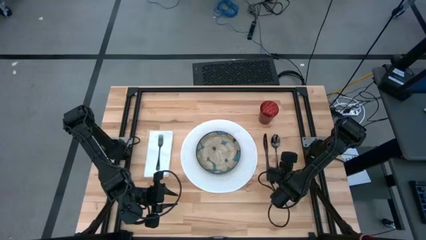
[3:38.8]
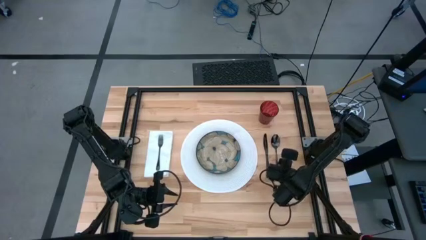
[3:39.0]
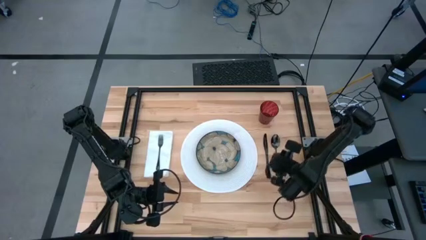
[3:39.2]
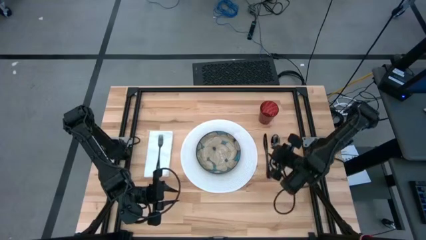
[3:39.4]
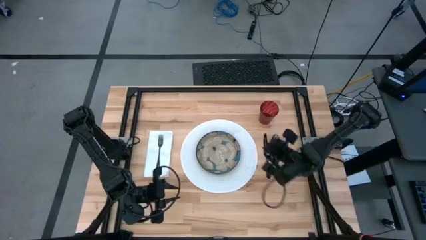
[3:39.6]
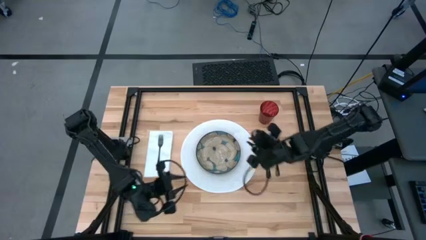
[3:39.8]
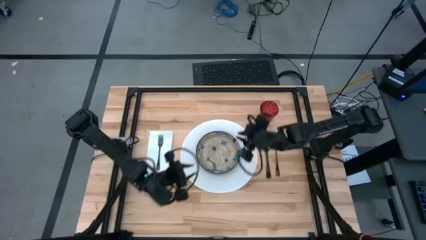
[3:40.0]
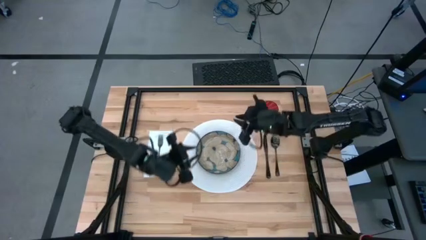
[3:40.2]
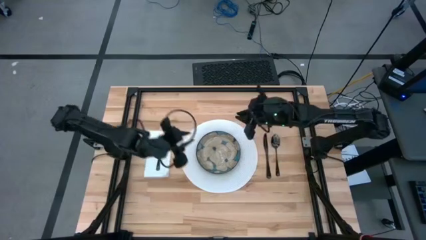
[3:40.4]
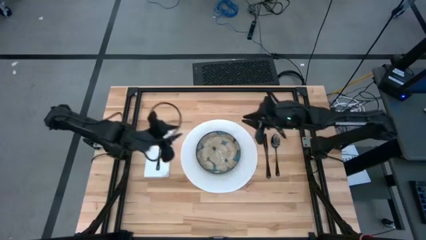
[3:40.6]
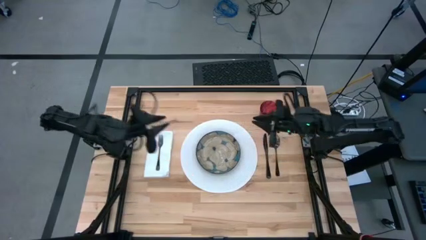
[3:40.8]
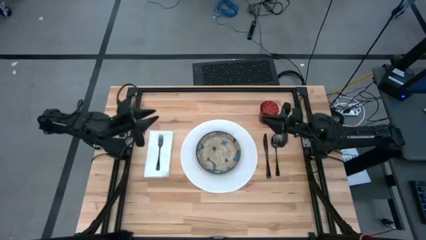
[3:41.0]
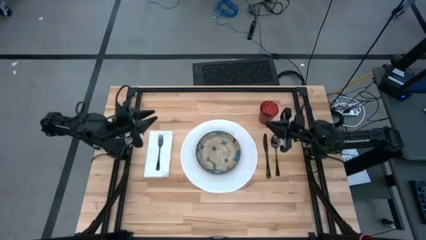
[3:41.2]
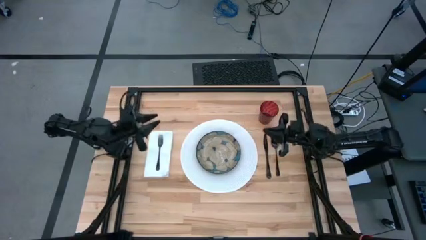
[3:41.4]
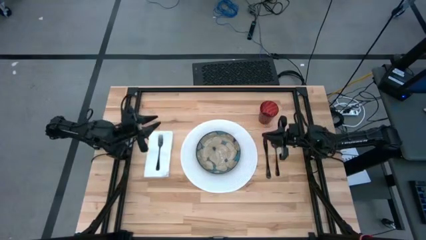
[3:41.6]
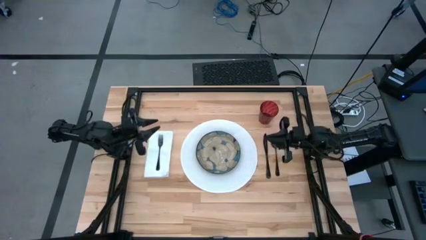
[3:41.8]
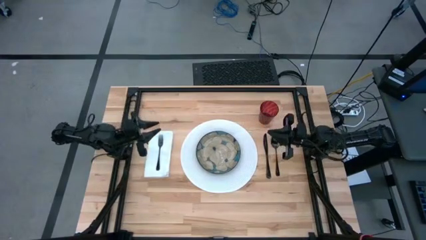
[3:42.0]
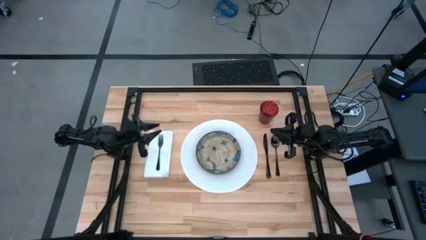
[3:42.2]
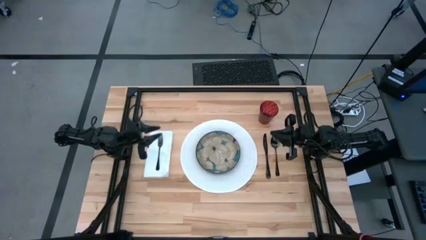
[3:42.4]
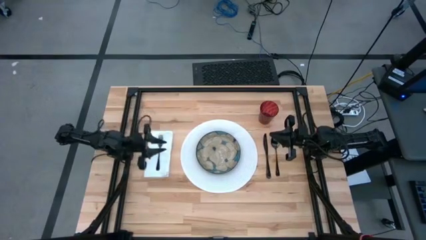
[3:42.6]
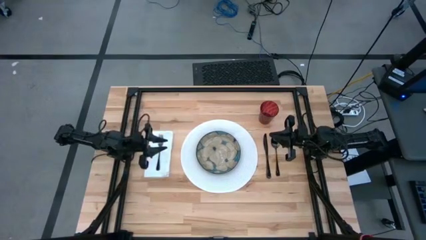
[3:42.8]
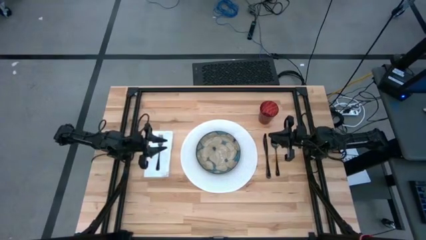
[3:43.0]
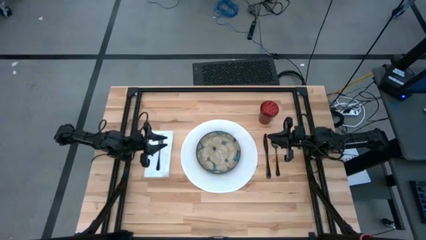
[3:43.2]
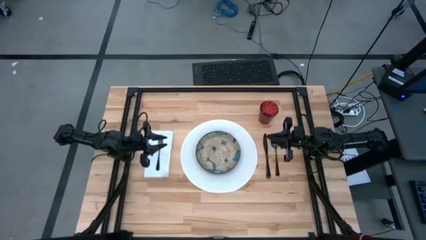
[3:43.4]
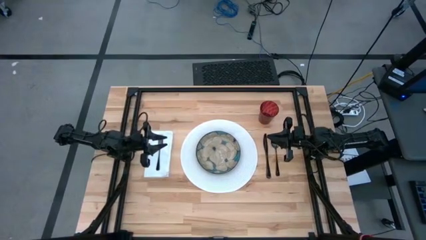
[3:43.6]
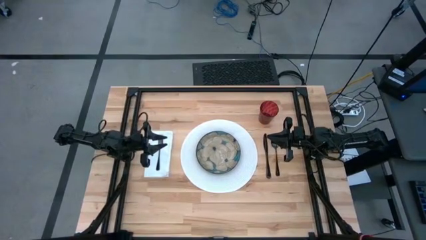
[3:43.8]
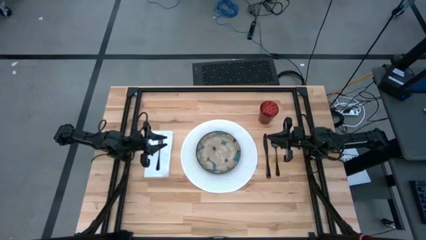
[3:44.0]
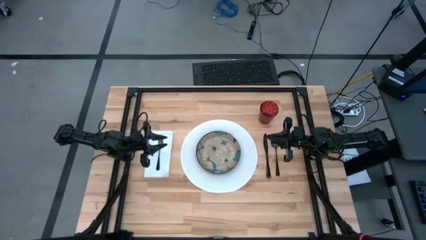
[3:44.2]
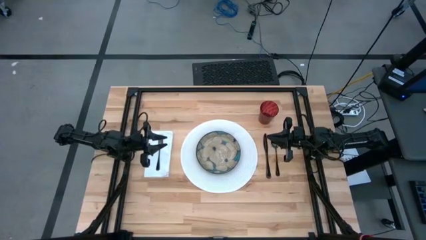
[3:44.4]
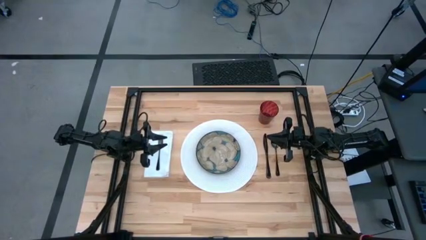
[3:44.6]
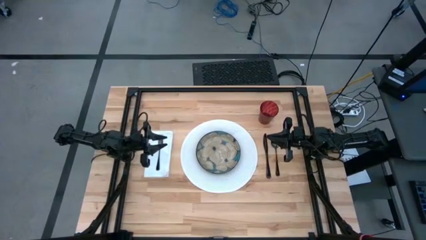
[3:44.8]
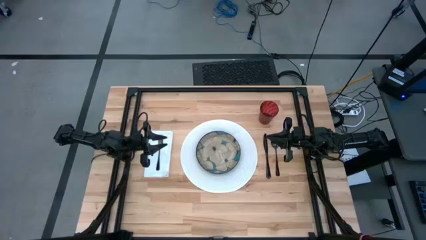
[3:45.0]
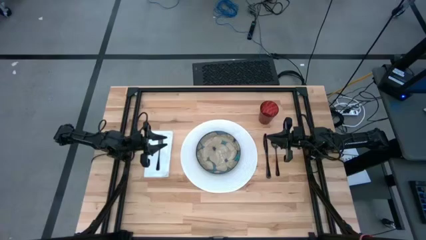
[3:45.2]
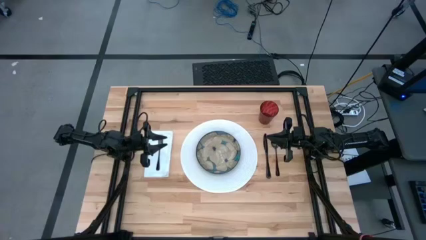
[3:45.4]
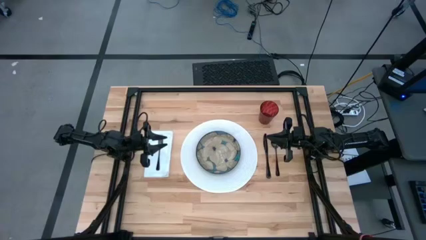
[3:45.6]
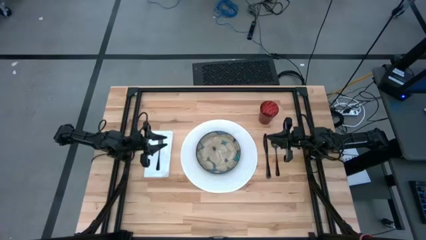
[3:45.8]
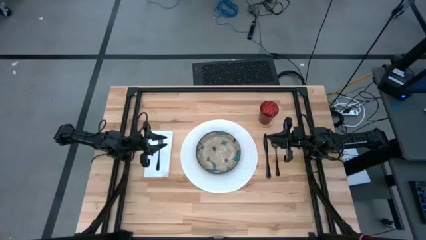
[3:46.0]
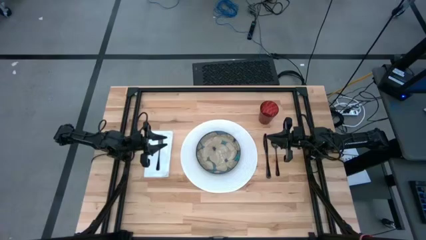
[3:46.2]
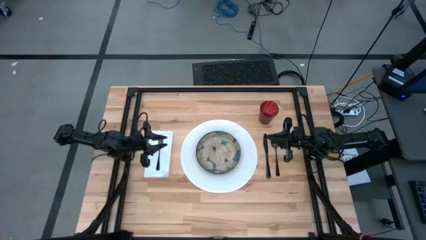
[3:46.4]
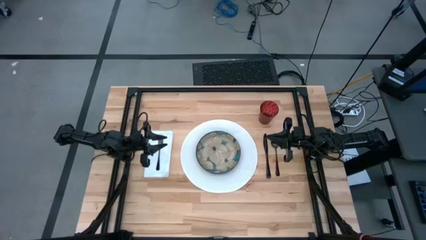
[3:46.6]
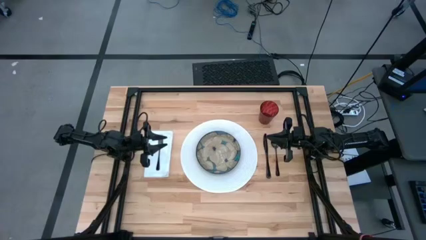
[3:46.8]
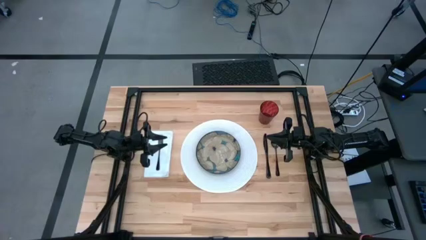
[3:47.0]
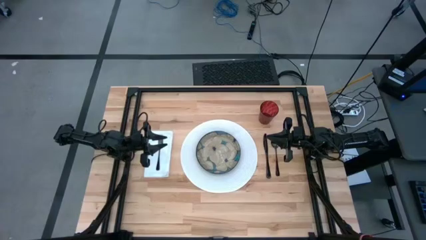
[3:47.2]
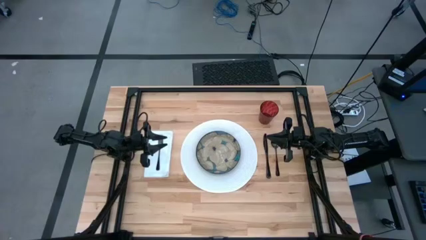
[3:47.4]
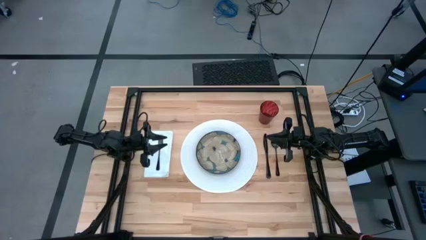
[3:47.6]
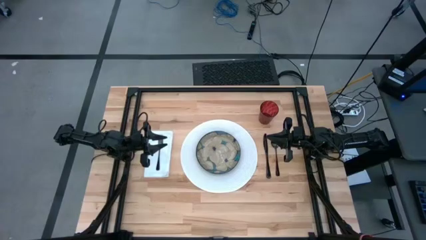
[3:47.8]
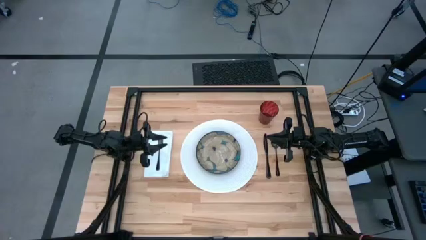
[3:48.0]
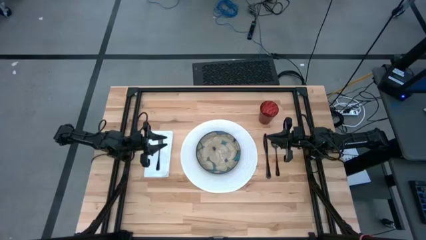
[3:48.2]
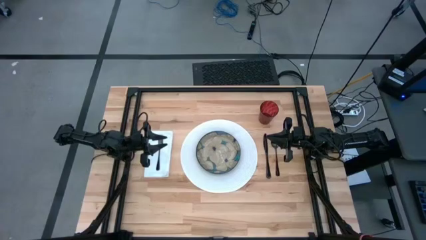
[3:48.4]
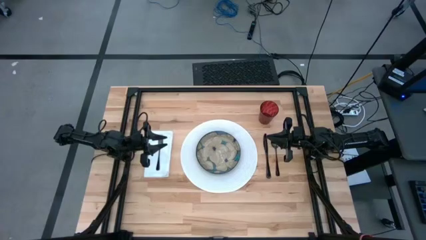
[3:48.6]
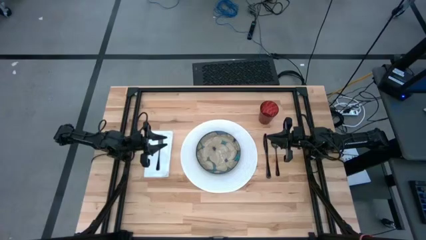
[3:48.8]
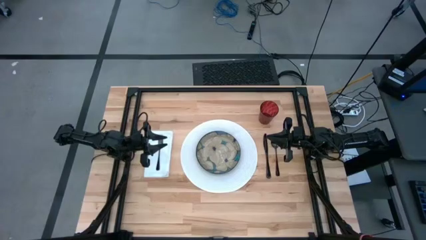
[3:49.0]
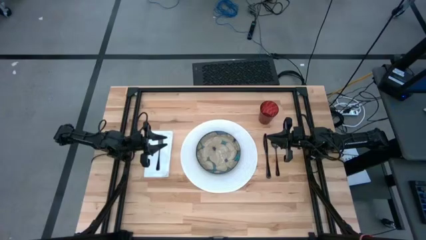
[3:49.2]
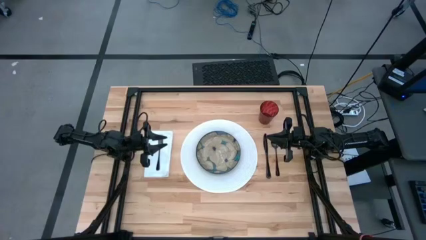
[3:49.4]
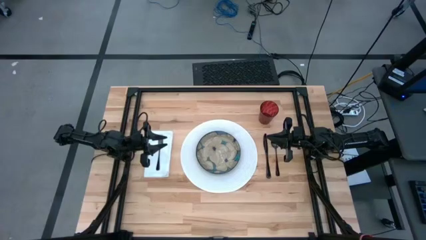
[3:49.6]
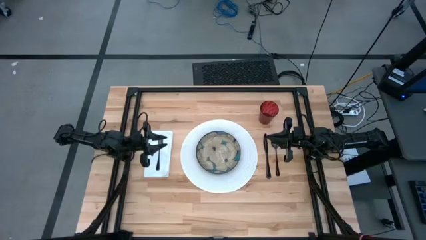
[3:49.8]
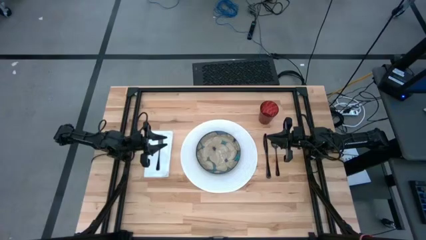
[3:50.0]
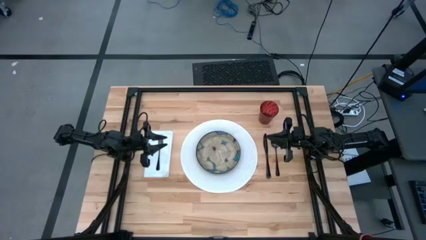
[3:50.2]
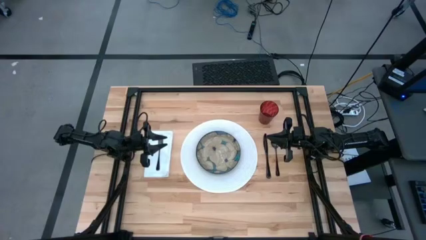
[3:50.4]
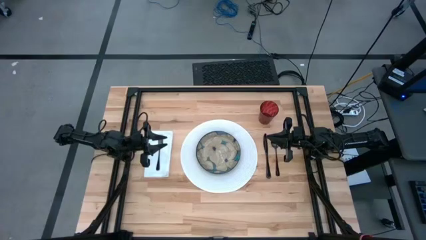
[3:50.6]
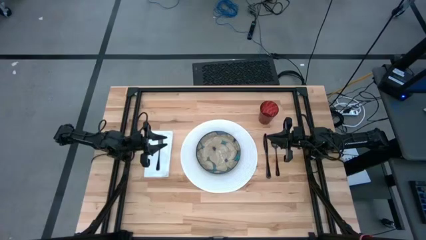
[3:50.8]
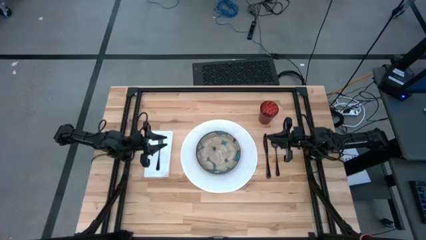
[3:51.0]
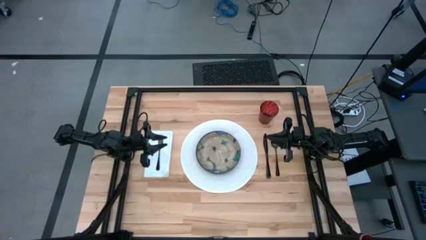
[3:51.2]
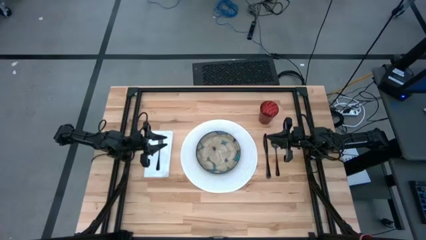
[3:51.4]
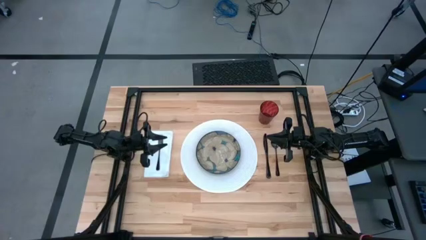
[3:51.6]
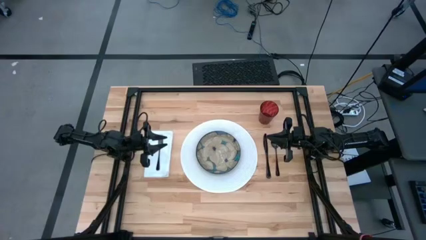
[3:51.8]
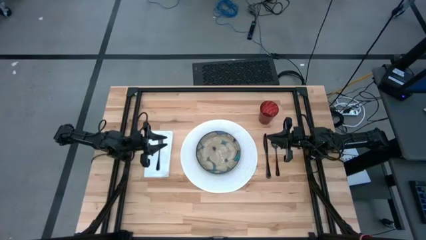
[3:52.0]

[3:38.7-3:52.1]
Task: Set table place
Return to Home Position

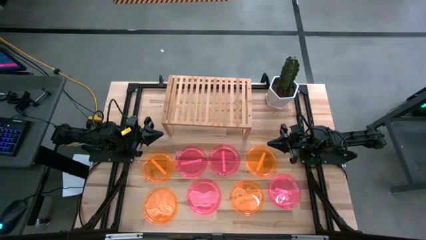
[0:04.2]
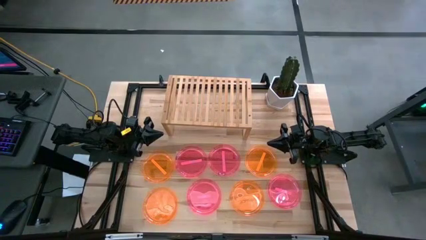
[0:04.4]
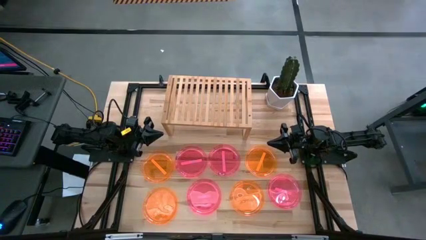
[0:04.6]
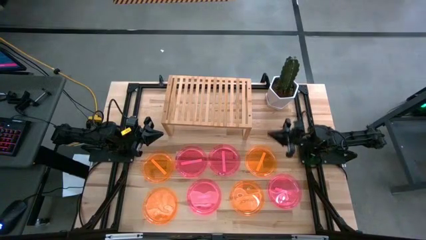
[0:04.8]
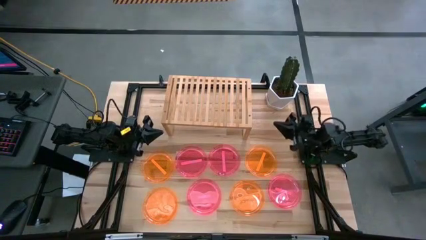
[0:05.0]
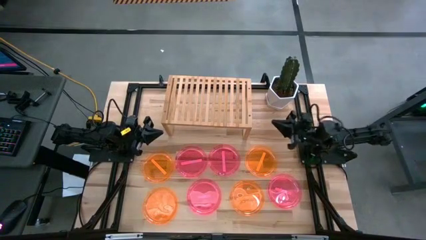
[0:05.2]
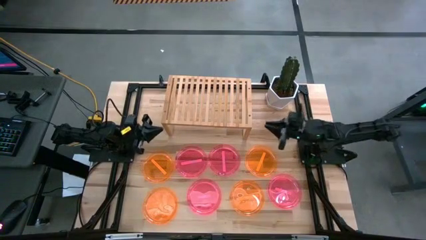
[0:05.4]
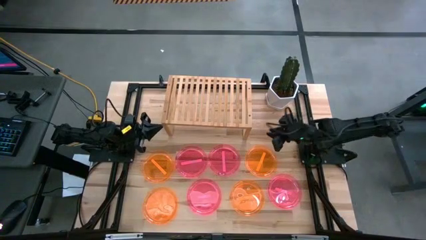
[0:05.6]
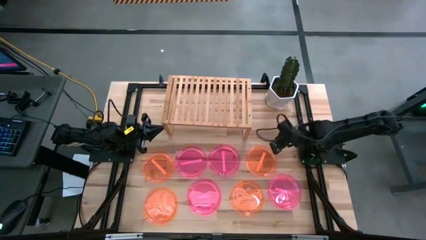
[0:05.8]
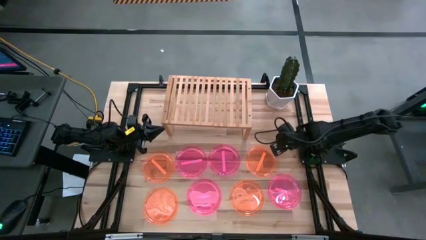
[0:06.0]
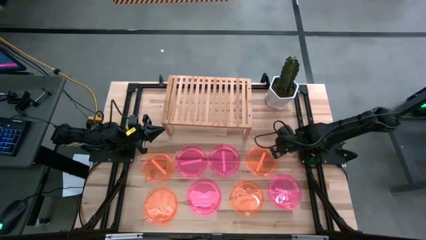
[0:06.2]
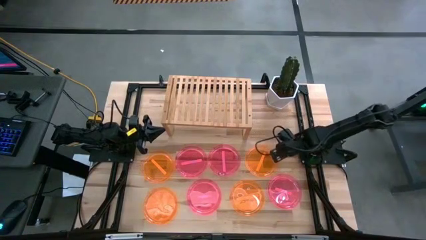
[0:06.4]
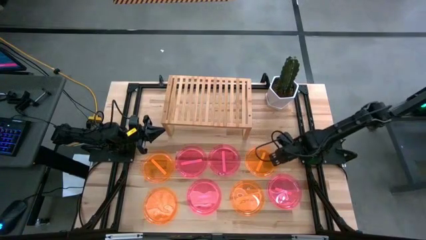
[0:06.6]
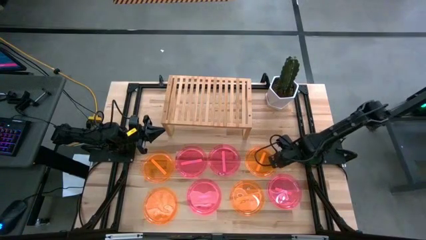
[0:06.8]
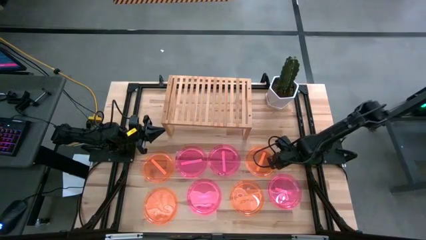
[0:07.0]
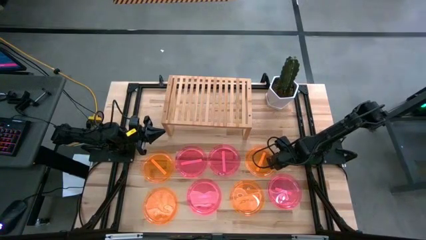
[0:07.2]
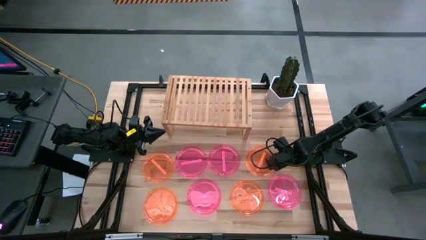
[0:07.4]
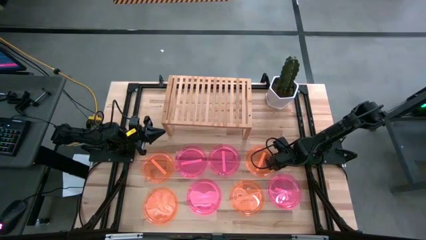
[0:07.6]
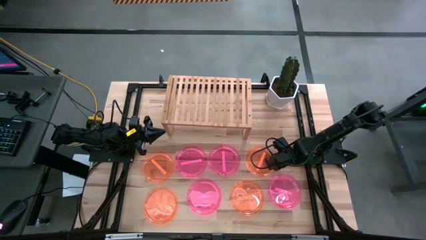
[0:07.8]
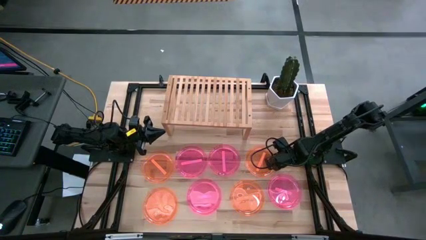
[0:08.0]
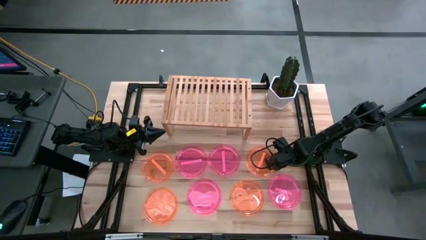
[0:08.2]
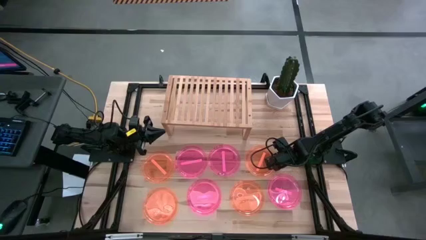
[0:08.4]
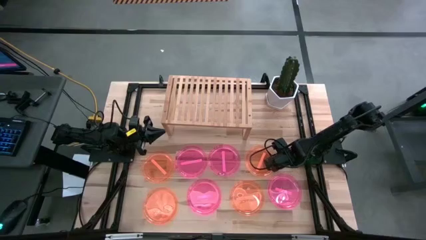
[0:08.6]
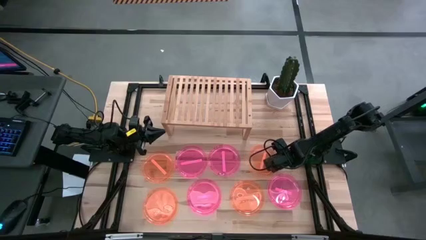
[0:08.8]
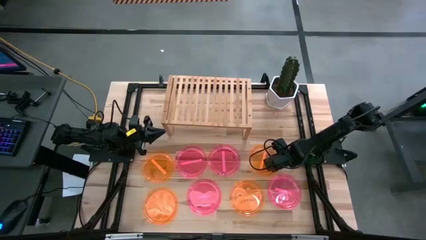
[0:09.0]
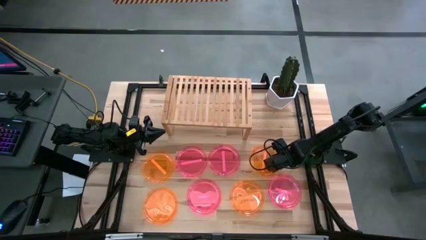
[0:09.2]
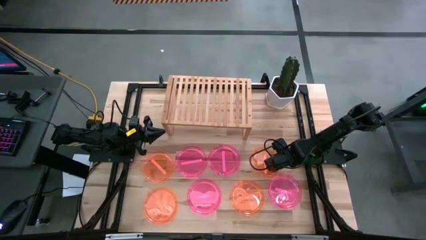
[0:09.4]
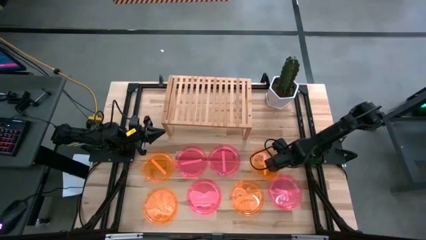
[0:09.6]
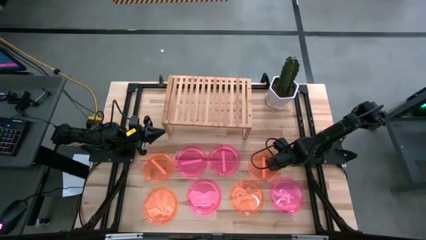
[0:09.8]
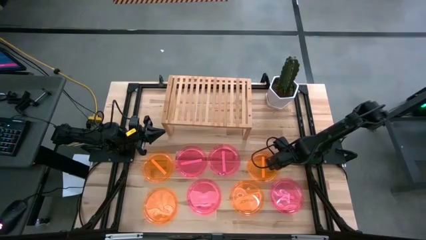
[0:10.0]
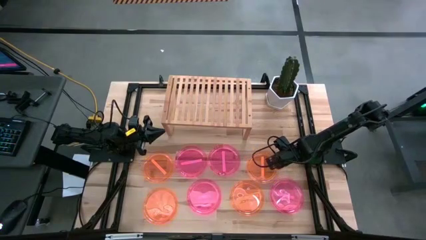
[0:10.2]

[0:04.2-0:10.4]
Task: Place and stack plates onto a shelf
Put the orange plate on the shelf
